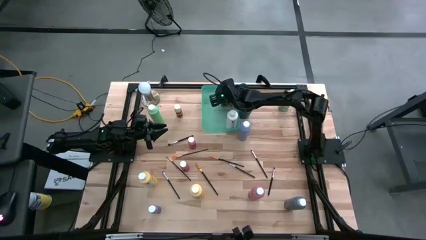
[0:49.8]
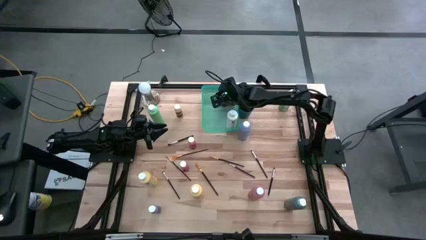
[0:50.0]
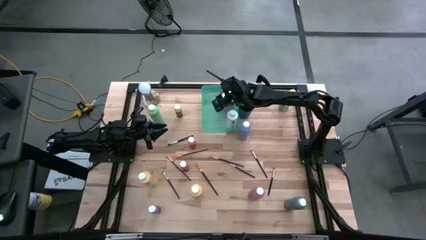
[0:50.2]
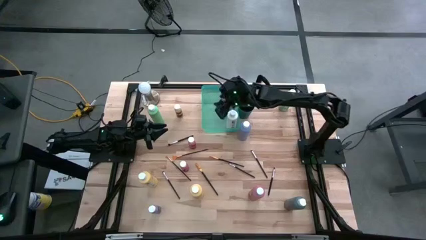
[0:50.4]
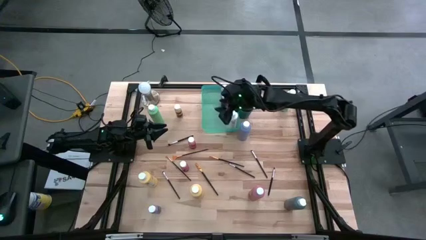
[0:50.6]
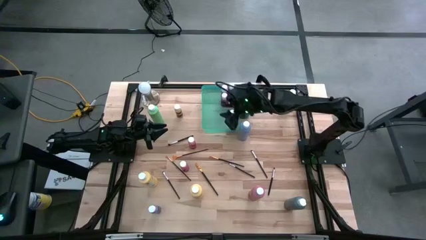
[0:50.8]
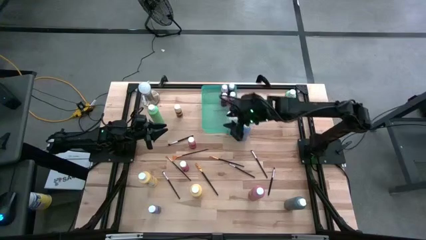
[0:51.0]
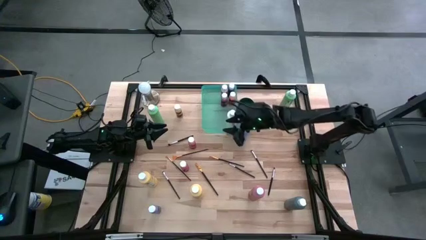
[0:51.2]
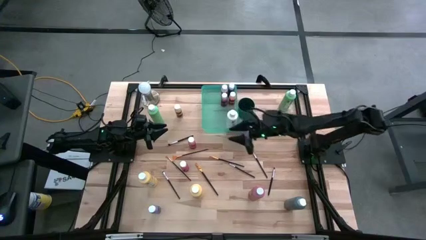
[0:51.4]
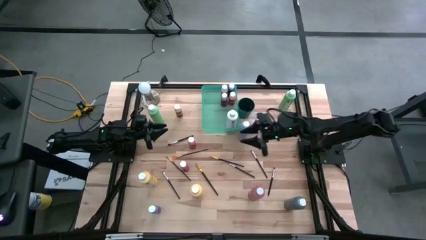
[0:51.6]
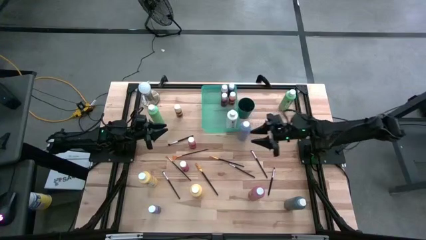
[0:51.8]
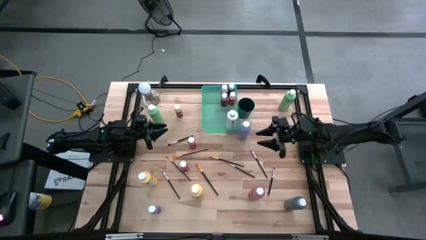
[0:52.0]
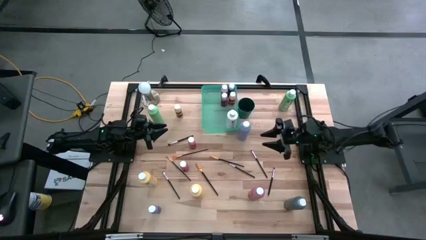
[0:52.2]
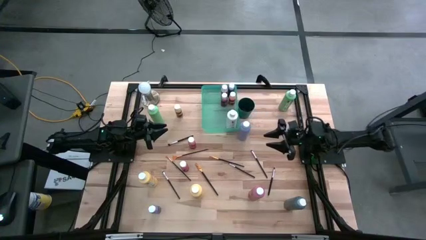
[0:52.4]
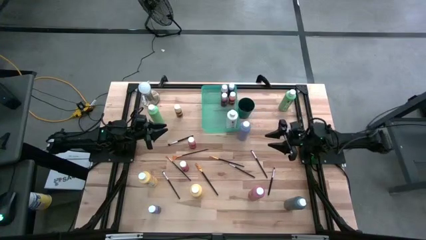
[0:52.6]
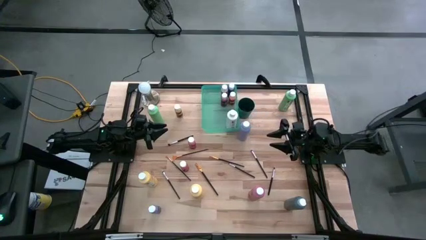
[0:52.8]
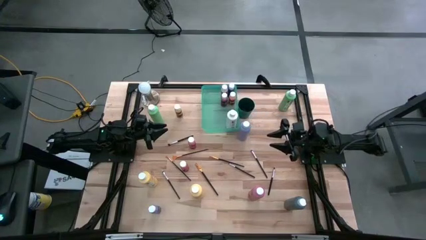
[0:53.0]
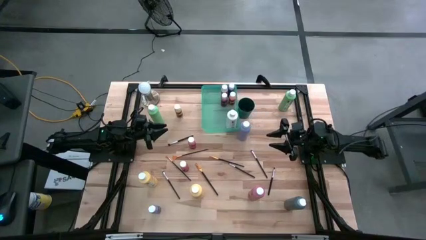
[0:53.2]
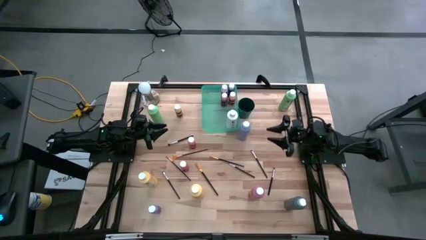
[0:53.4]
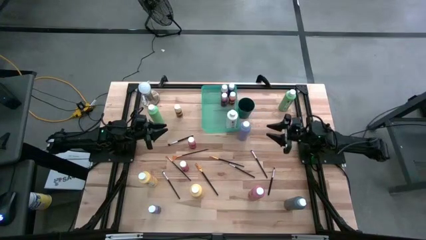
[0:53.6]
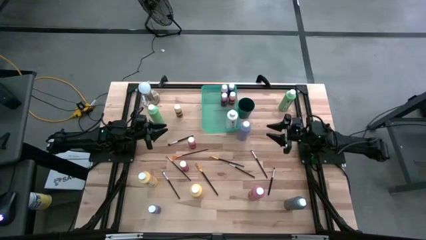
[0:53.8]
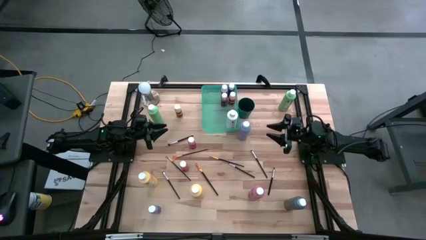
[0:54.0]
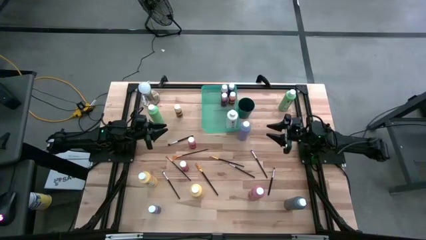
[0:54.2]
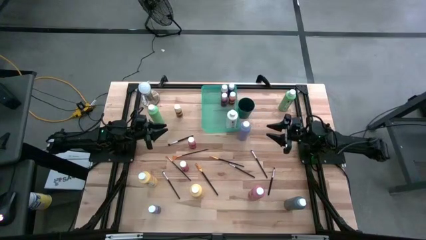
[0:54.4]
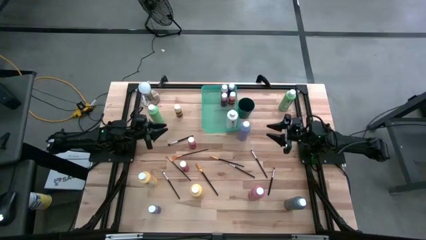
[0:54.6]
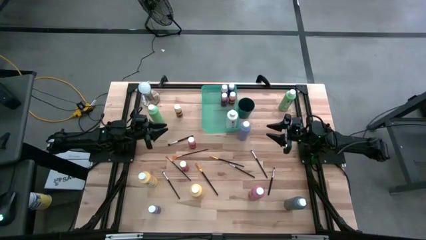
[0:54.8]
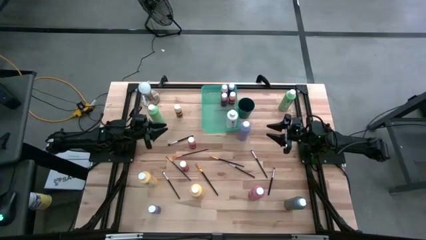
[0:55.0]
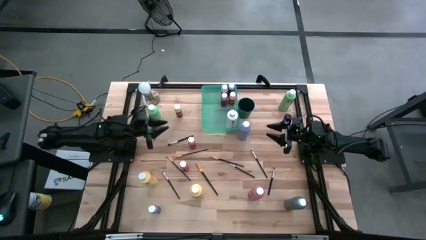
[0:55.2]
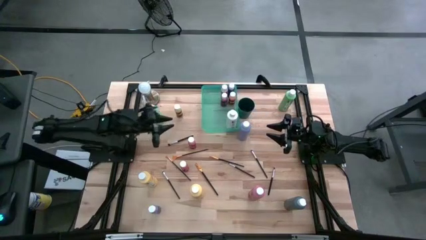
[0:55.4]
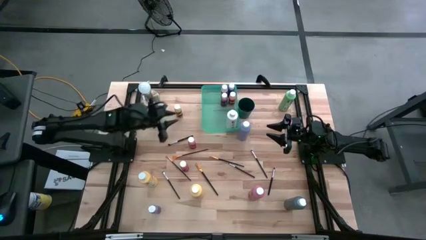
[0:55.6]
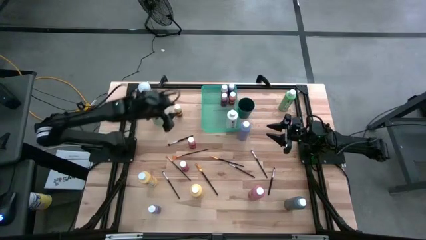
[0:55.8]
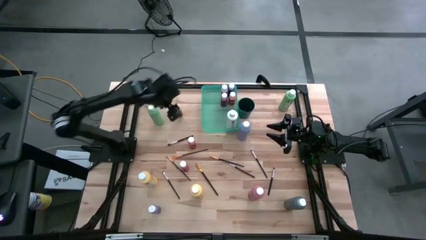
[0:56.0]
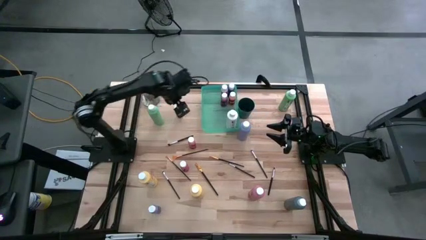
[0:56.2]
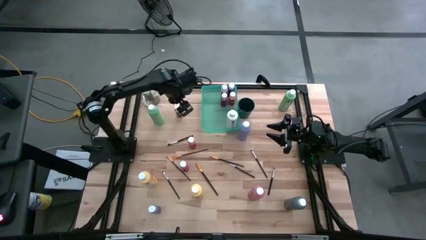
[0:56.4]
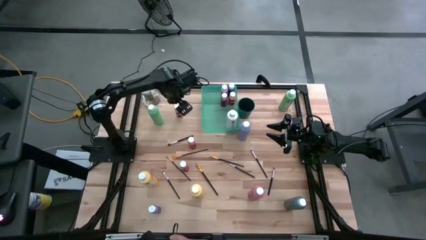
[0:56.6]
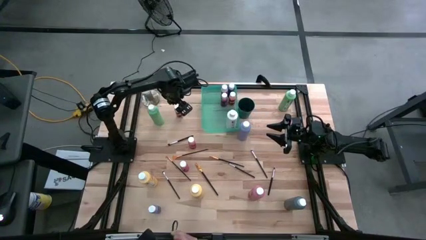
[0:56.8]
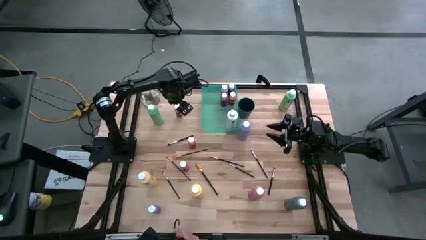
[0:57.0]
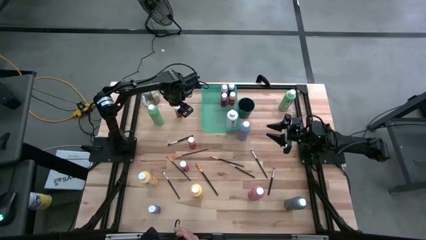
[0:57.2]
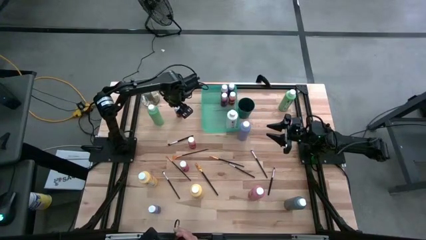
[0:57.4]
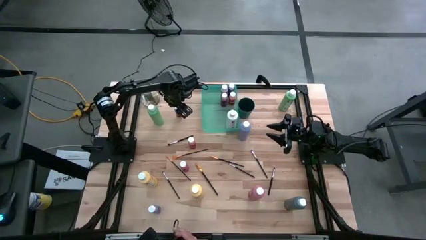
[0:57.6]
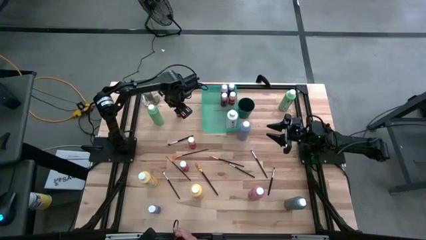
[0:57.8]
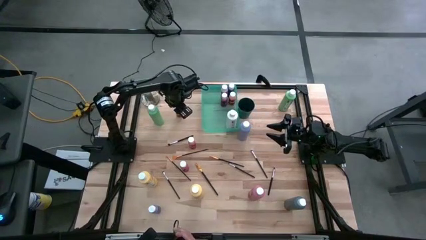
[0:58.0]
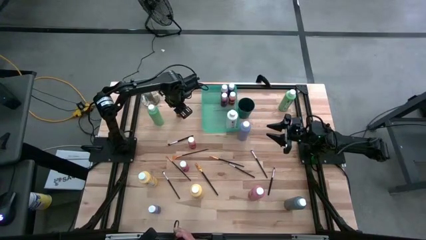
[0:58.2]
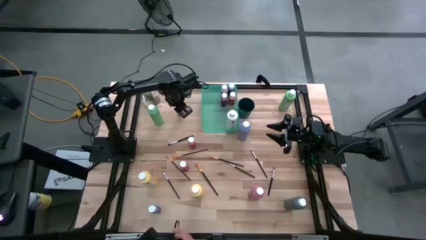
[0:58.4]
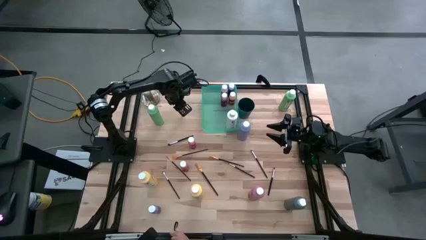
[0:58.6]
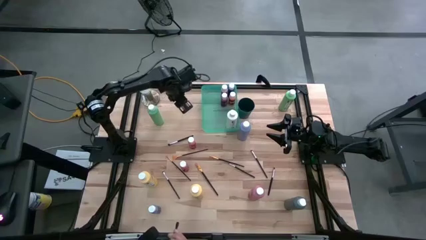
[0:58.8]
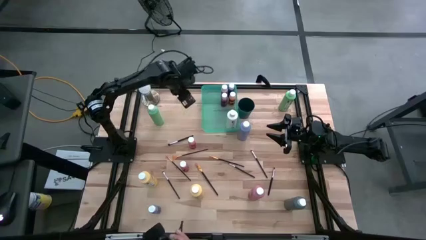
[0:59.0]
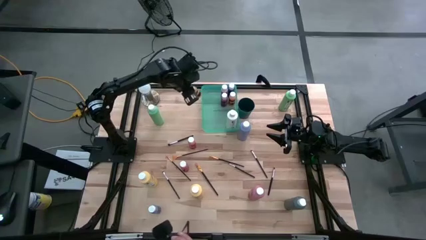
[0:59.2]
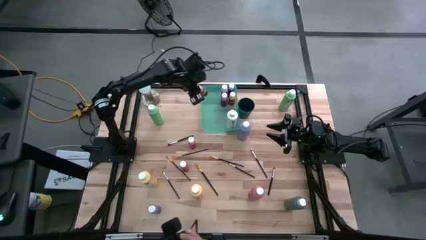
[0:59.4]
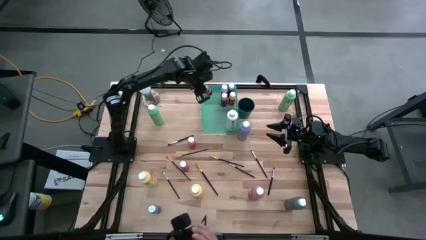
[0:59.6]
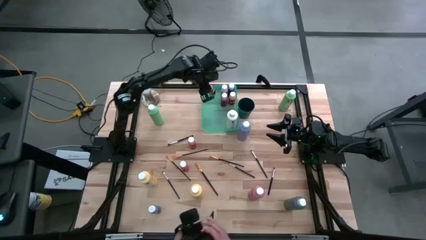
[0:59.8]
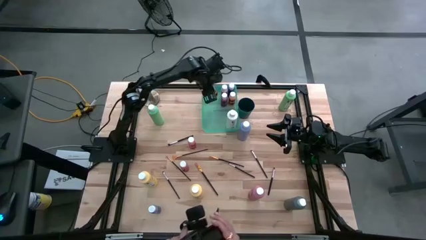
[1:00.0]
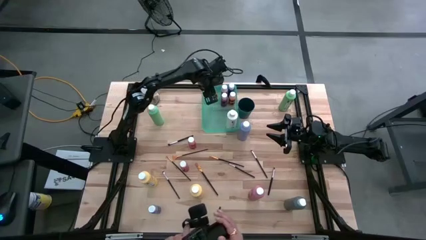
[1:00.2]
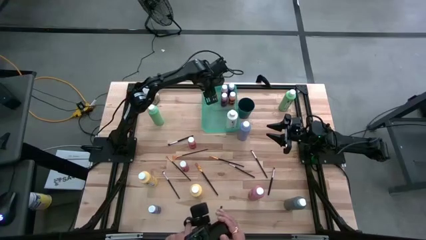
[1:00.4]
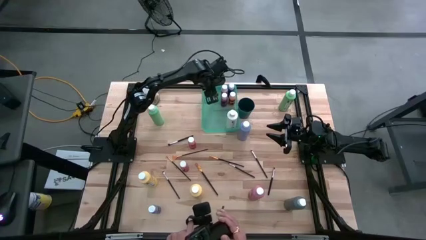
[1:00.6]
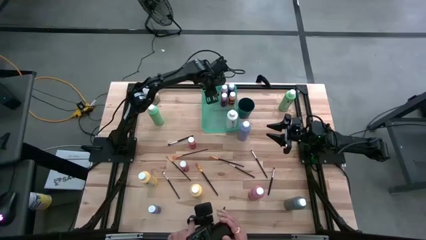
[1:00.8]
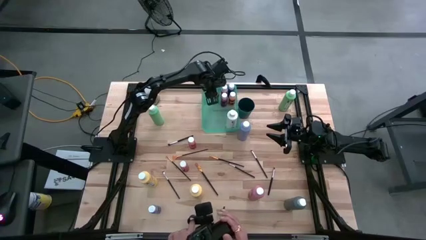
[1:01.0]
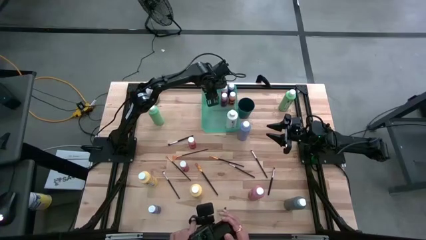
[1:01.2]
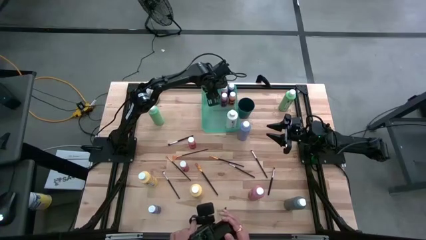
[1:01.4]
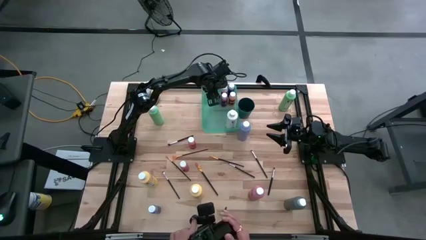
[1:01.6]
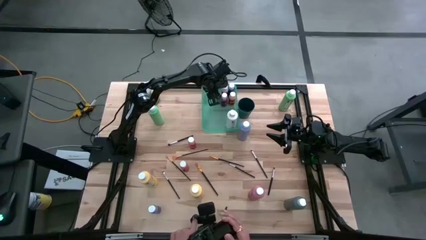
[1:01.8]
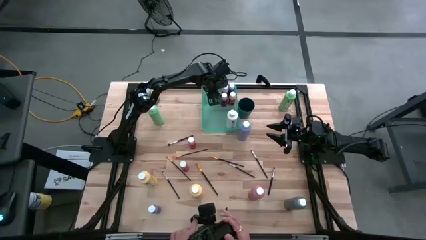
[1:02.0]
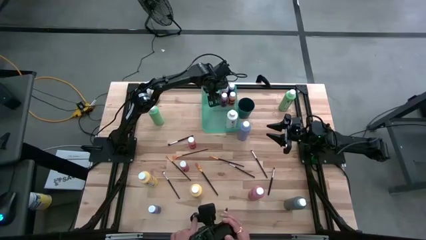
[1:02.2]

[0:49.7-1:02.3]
Task: Pick & Place Paint Supplies
Put the yellow paint bottle into the green bin

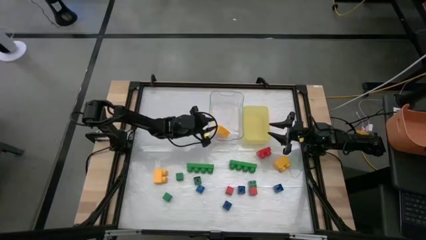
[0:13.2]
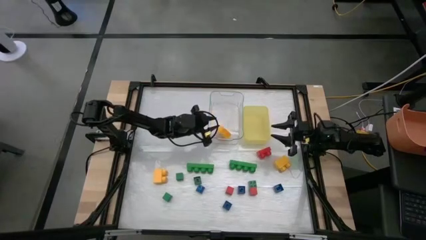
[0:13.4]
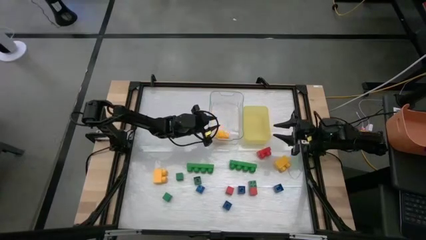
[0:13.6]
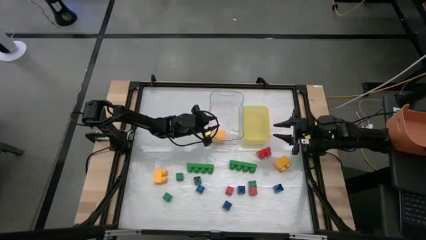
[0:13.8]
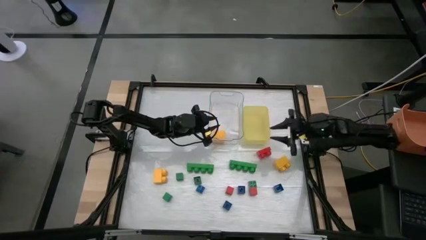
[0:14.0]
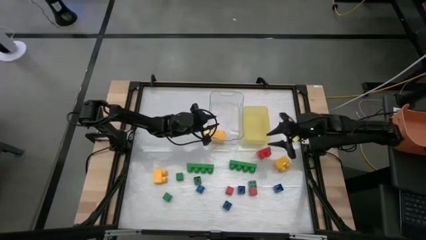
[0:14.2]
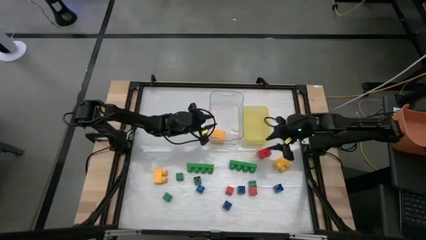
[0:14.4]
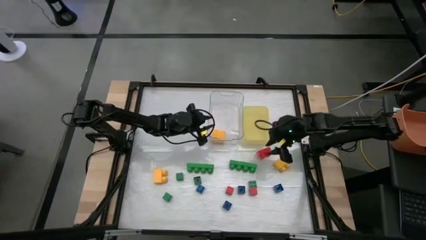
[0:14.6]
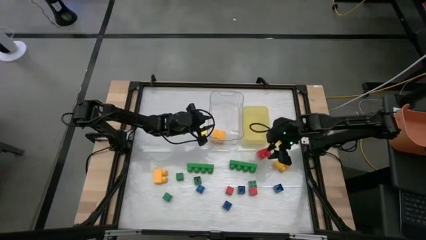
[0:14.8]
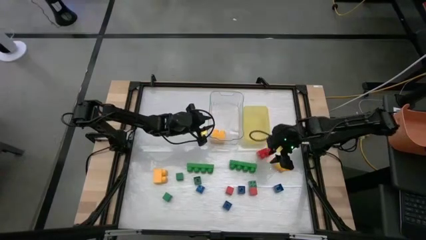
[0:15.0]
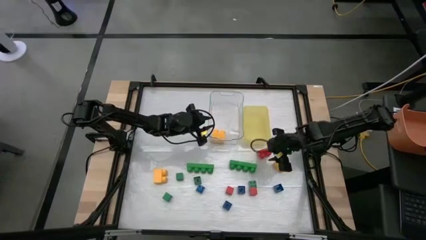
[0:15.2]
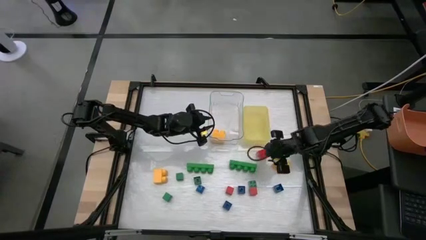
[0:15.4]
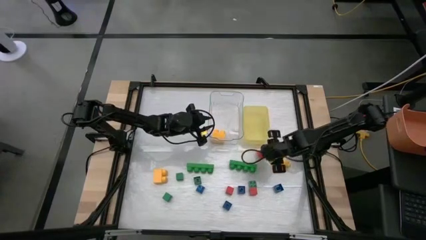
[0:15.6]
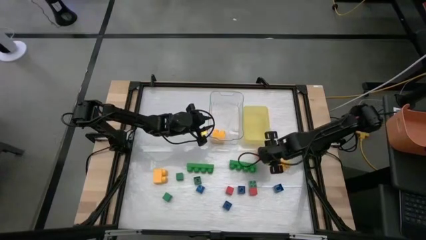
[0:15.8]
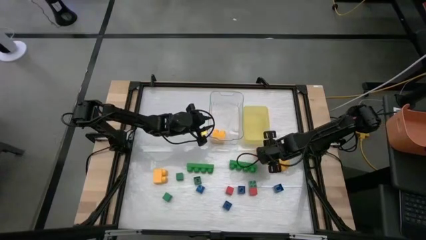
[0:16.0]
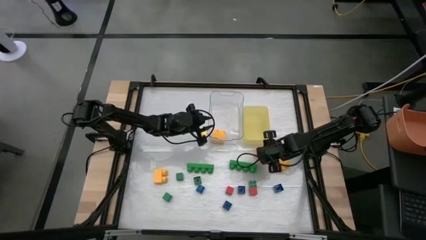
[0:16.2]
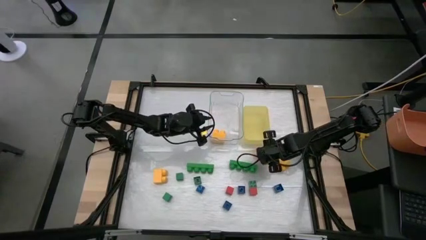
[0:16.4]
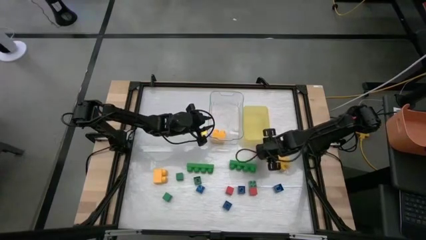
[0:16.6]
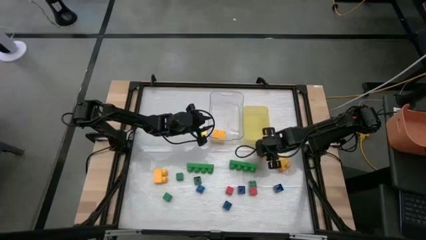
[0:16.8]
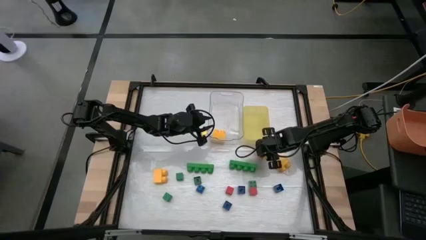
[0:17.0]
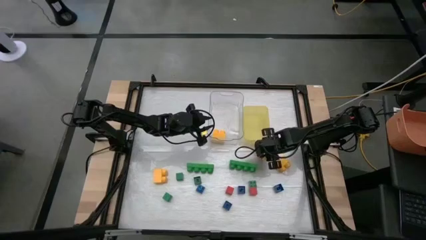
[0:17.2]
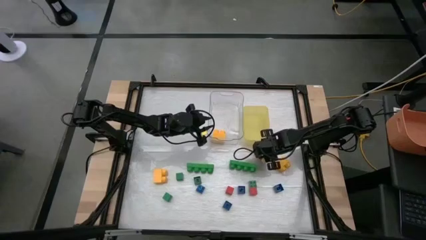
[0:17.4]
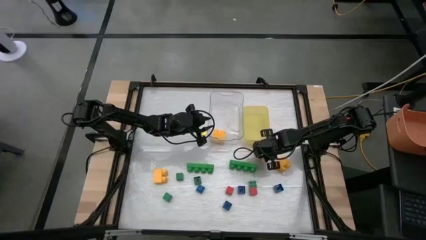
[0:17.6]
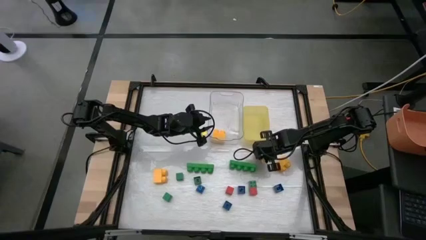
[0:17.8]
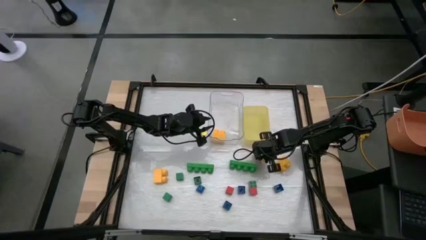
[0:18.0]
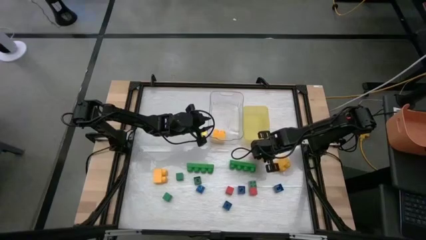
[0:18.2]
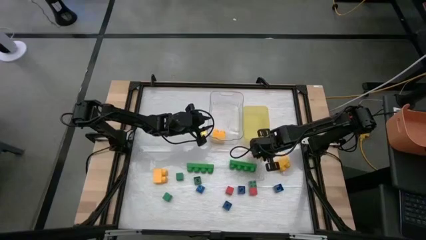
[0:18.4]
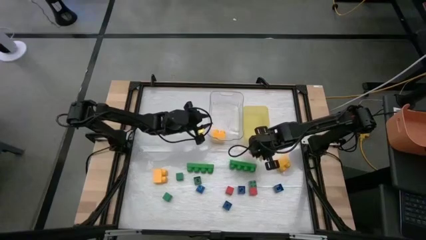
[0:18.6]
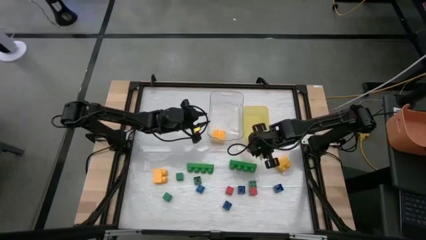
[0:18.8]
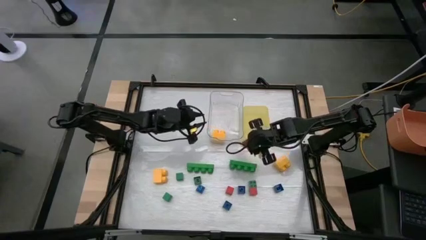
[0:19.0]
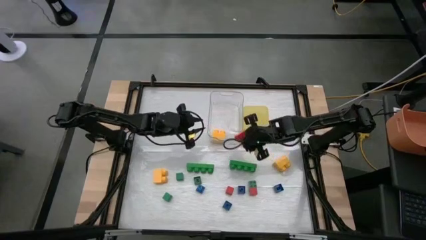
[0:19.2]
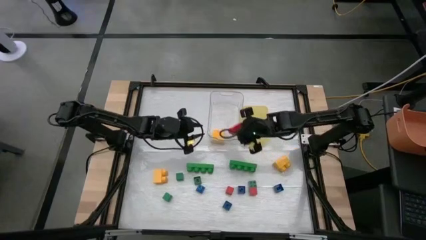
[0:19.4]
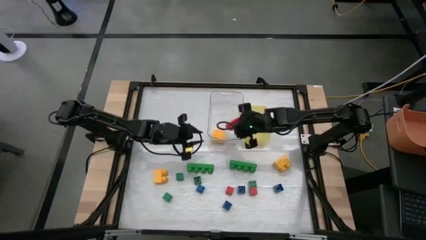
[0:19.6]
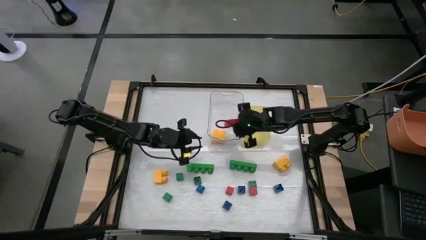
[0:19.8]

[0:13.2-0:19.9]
Task: Sort blocks by size
Put the large red game piece into the transparent bin
